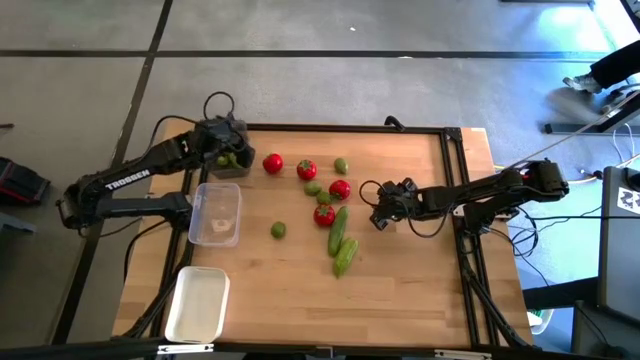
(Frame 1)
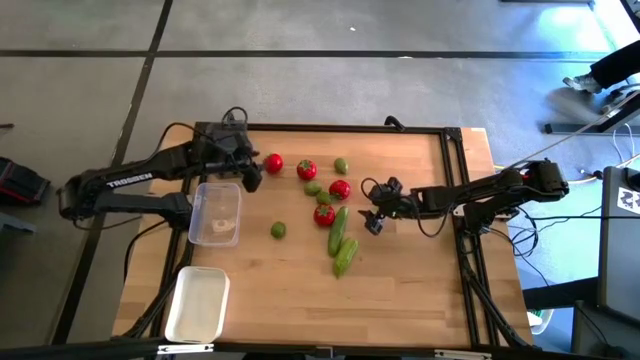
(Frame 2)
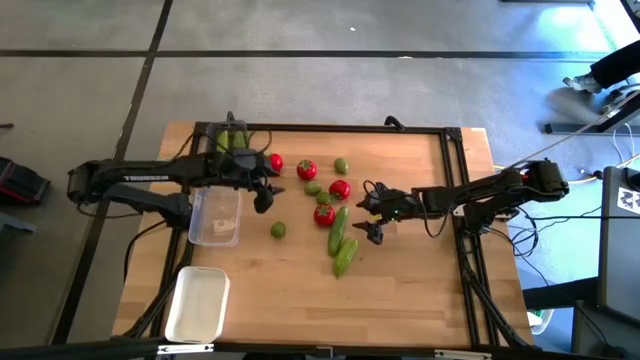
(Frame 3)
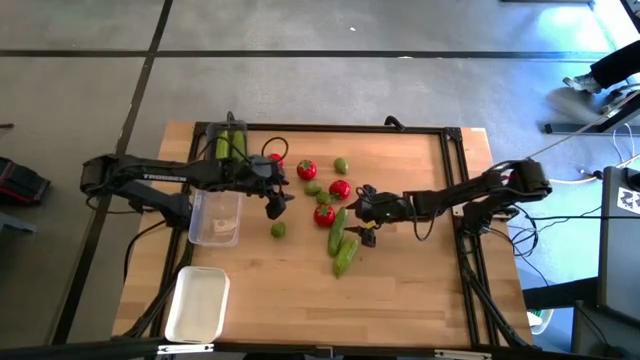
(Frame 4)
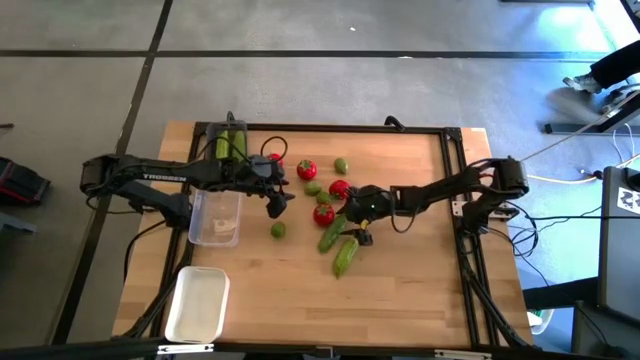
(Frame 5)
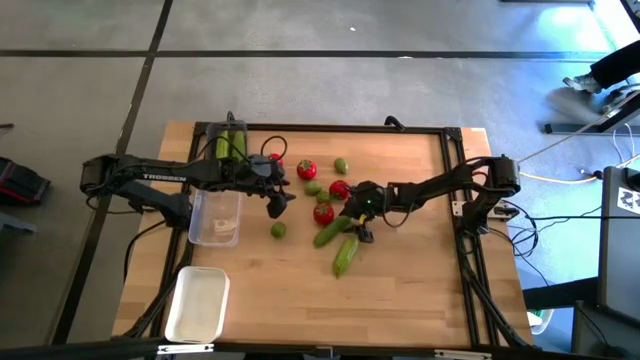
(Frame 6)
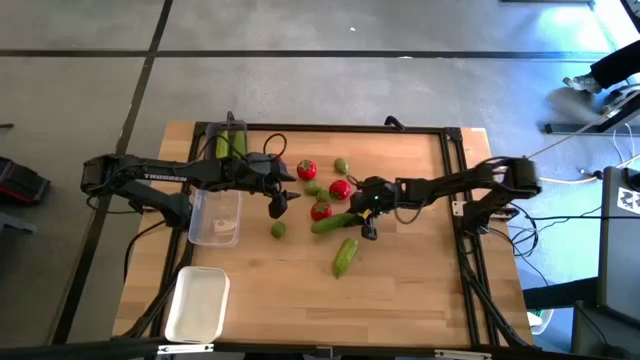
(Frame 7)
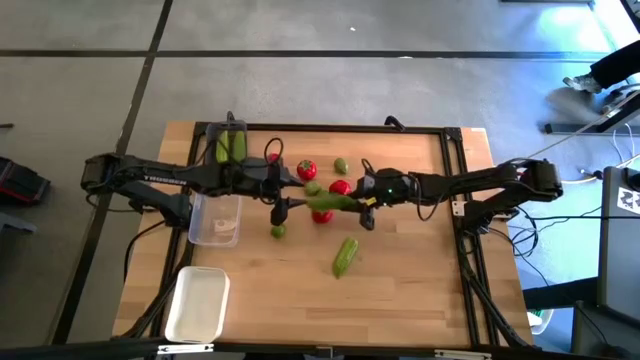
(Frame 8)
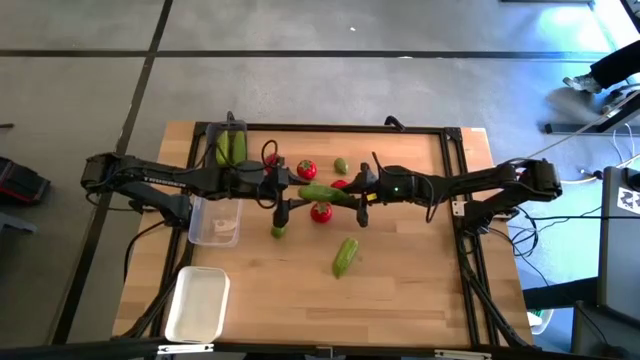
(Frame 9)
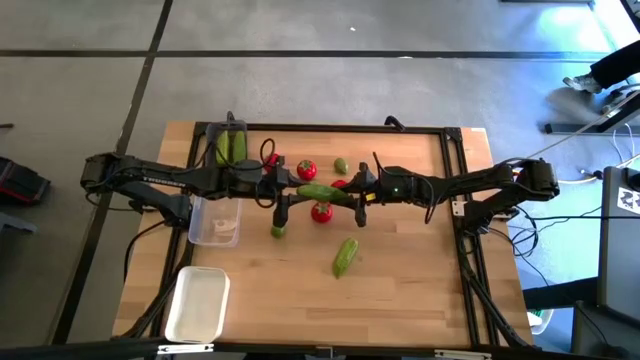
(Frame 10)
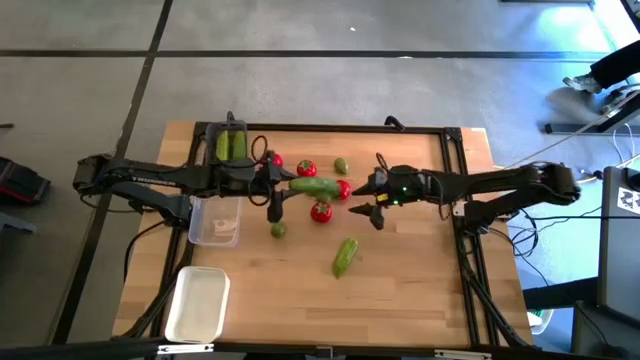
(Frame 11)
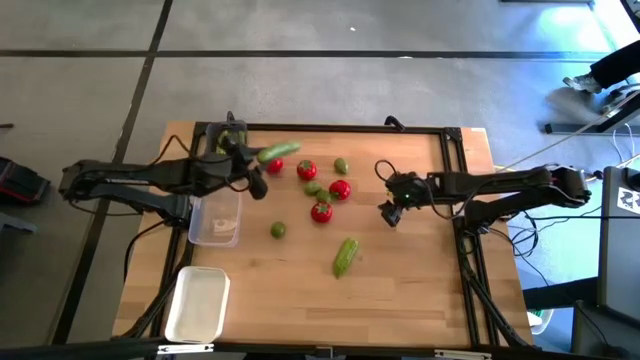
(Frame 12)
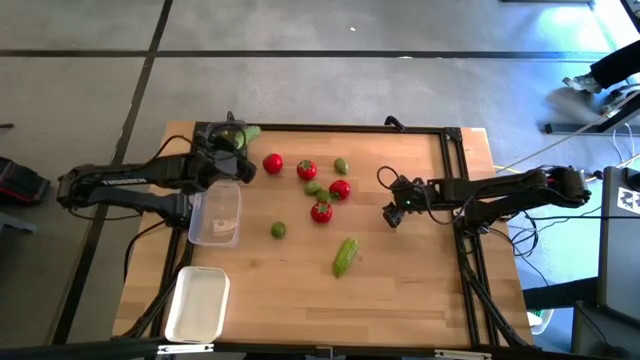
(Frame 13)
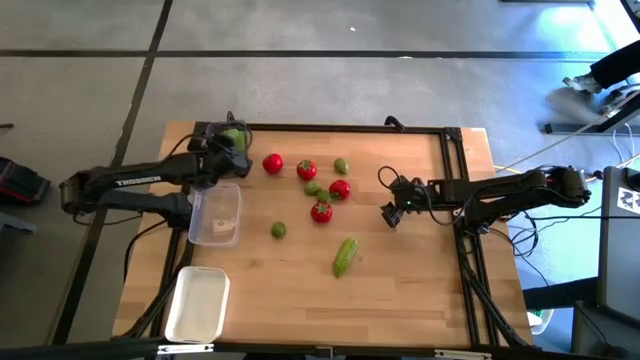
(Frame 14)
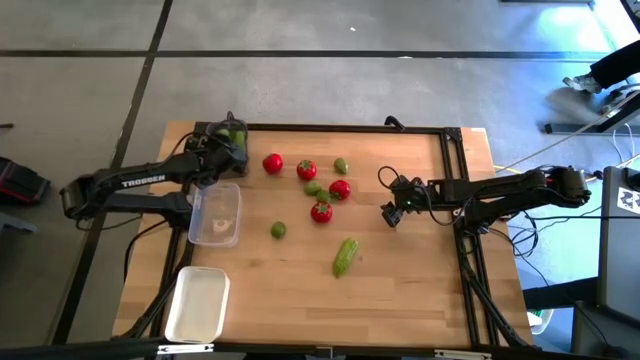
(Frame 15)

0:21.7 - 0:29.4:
Task: Sort produce into baskets
Put the cucumber into the black bin

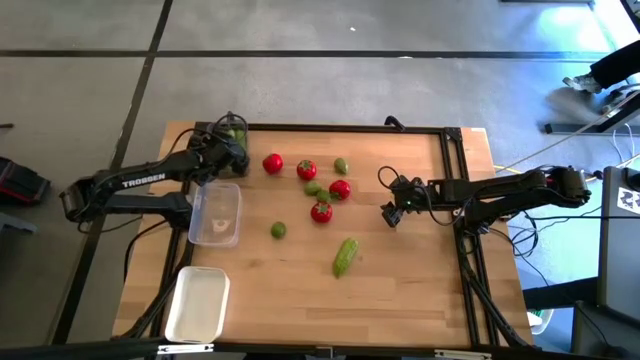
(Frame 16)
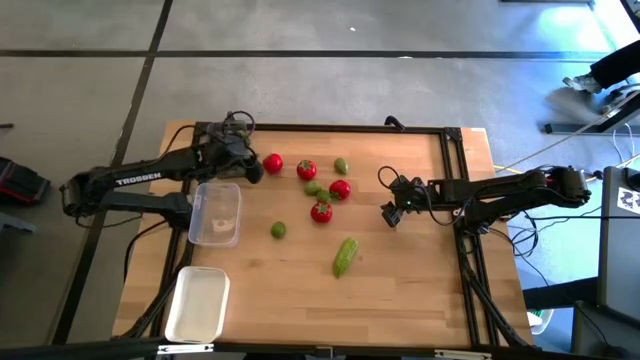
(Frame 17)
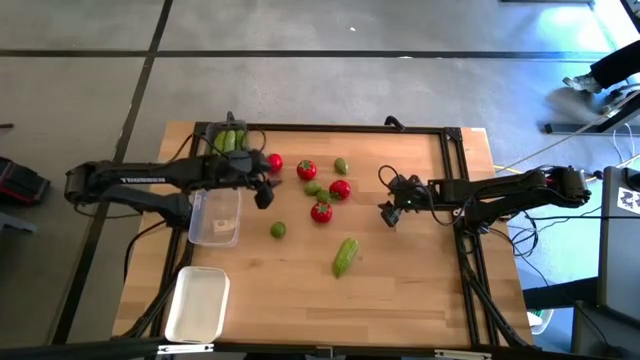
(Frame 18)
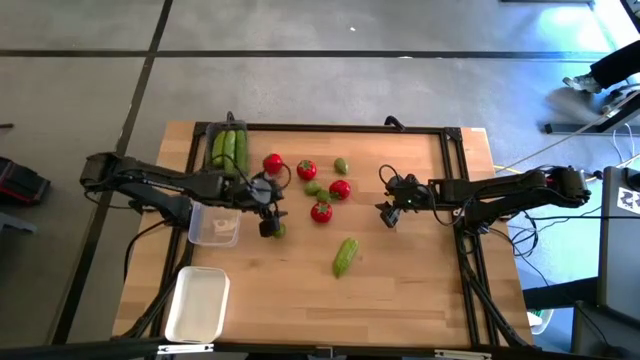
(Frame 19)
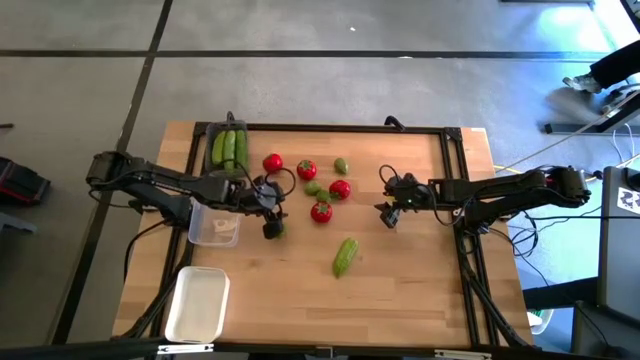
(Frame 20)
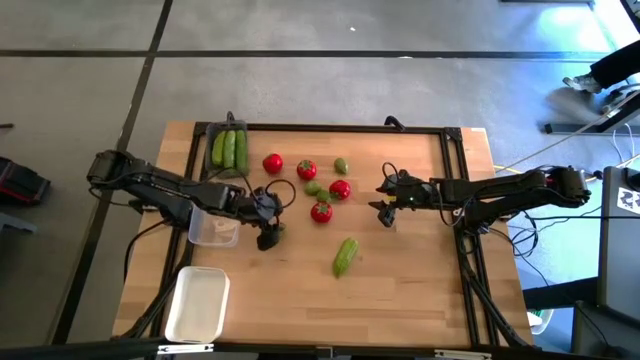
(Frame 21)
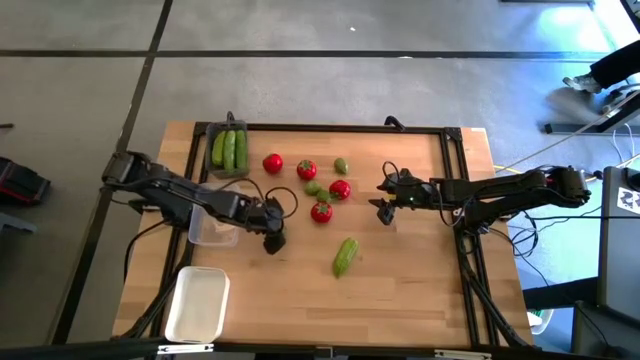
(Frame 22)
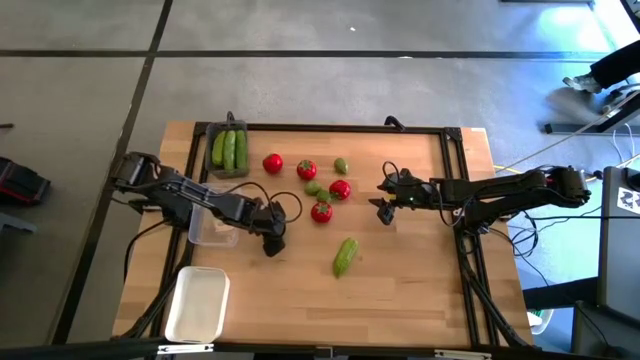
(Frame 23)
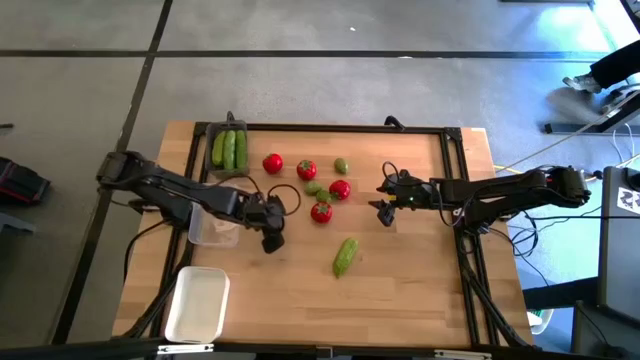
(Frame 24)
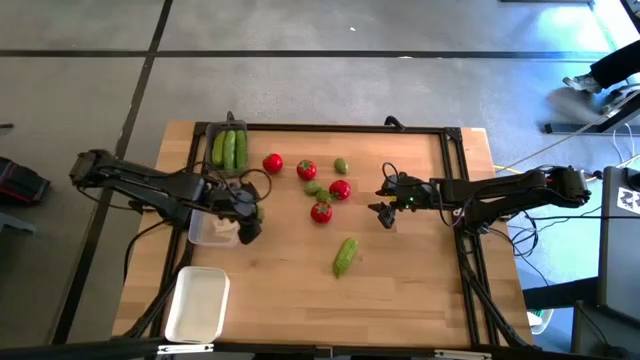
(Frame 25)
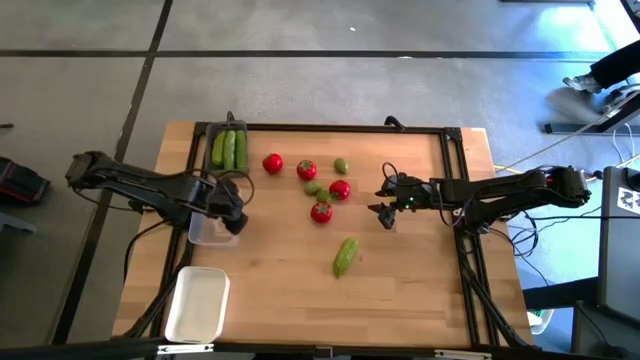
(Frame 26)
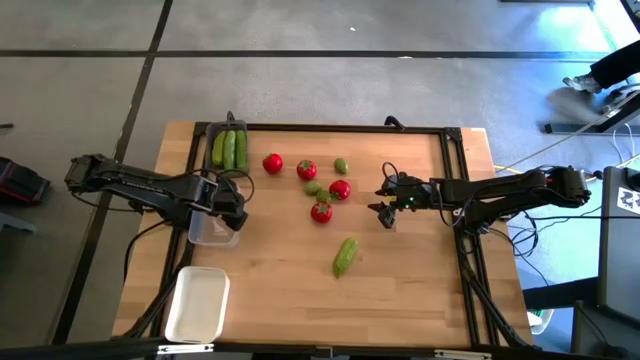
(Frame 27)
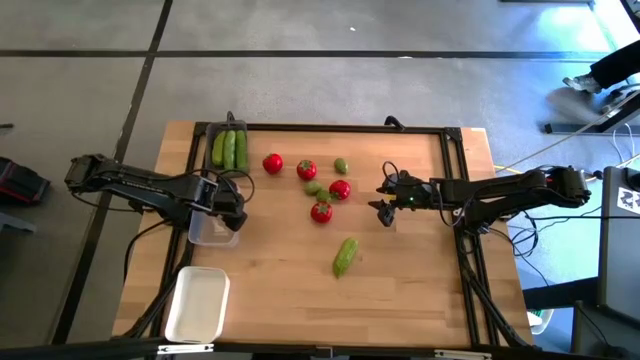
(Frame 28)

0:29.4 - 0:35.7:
Put the lime into the transparent bin

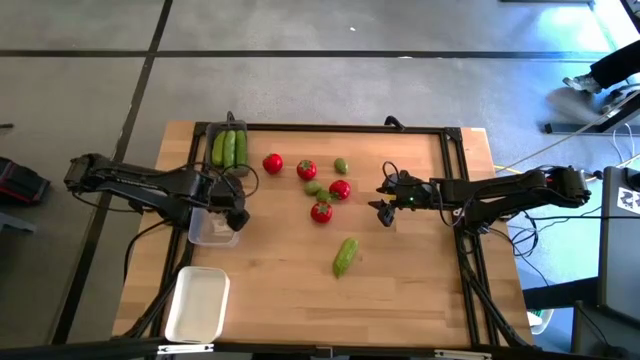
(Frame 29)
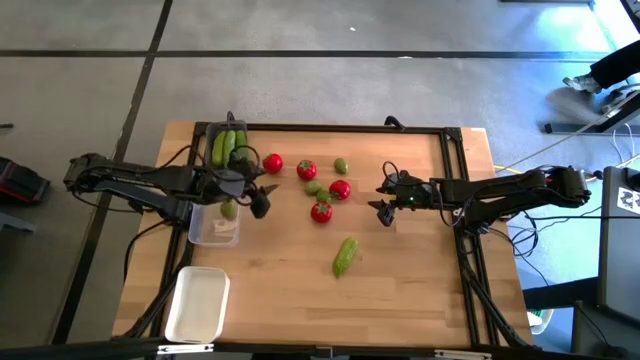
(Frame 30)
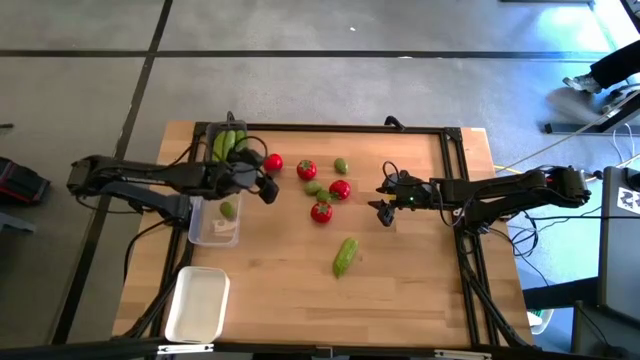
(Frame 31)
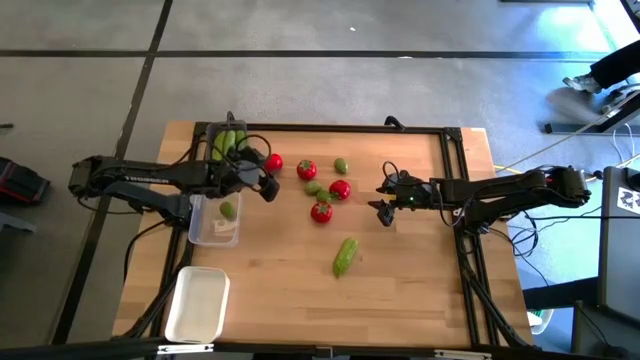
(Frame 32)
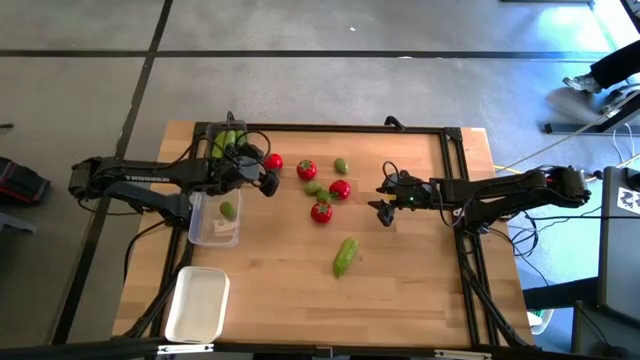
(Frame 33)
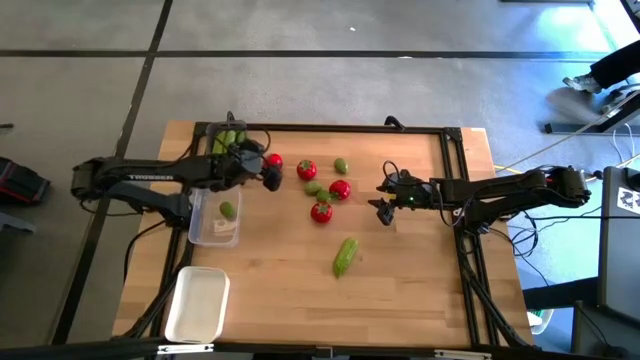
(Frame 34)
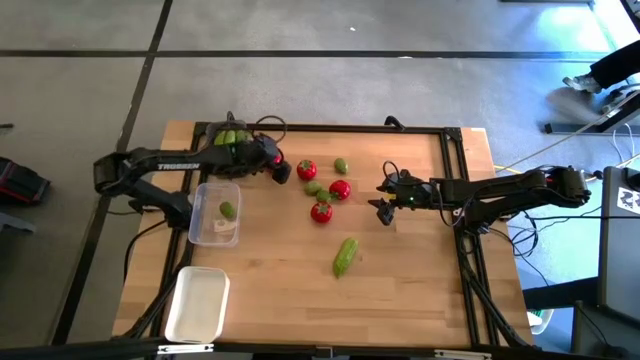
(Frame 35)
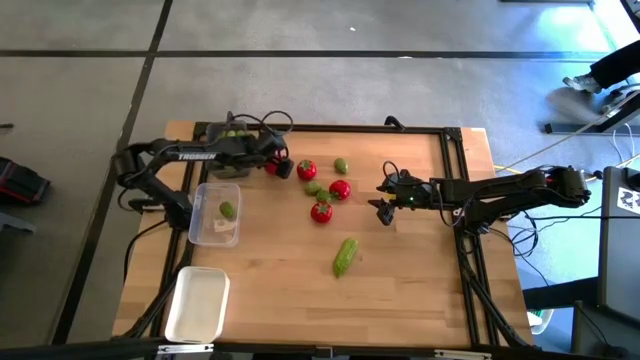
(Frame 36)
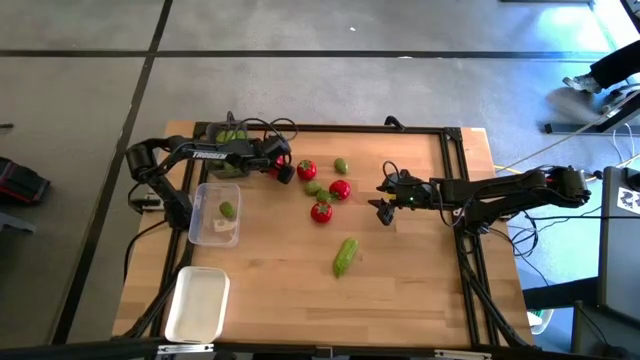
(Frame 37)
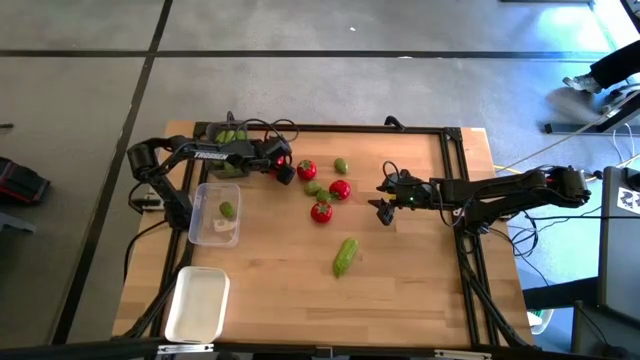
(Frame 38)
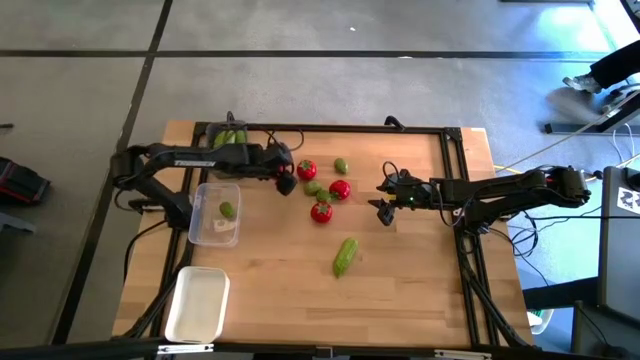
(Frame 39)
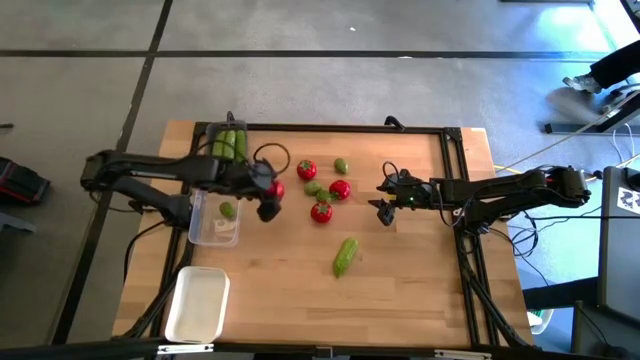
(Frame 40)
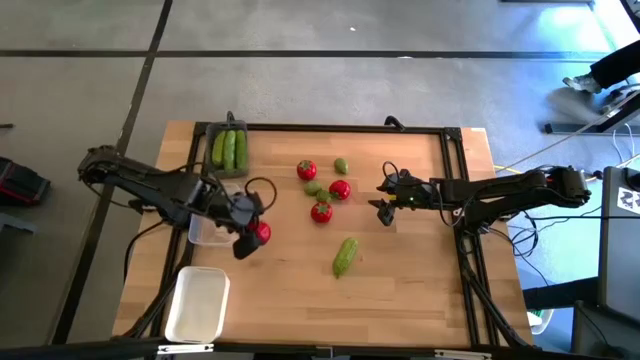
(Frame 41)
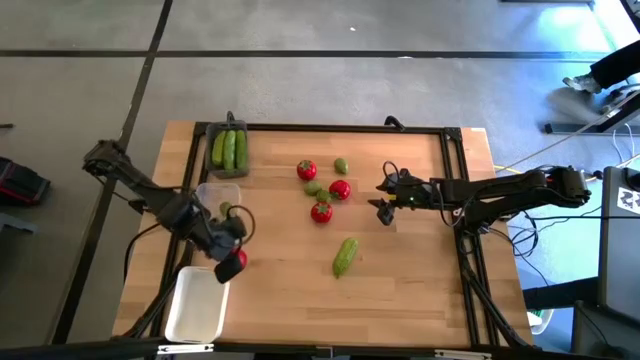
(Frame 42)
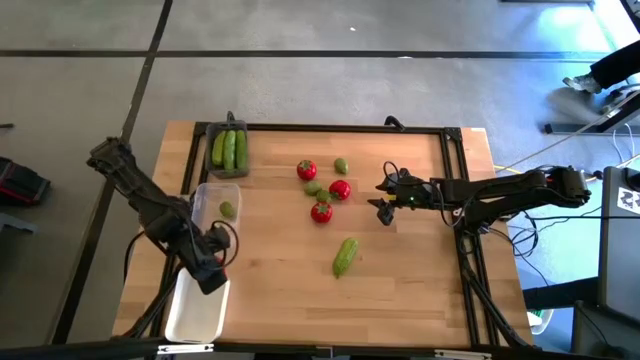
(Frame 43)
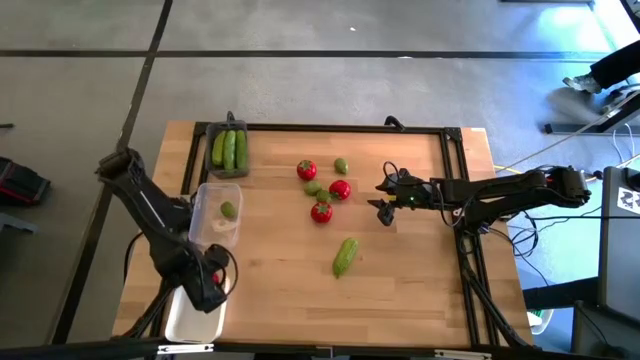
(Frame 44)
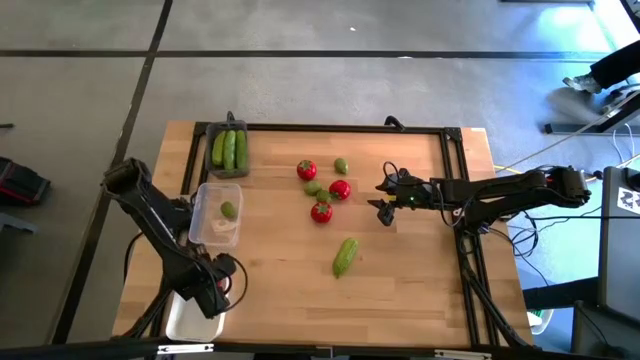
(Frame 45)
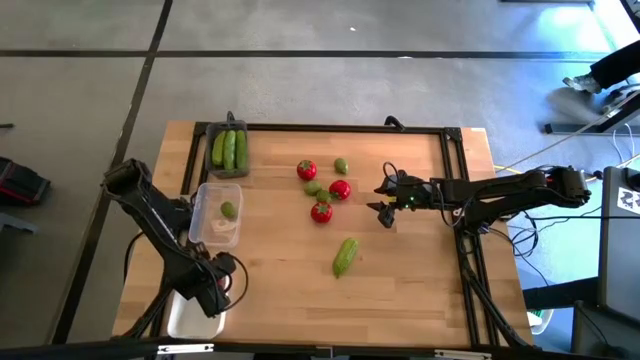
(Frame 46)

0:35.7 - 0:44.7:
Put the tomato into the white bin
